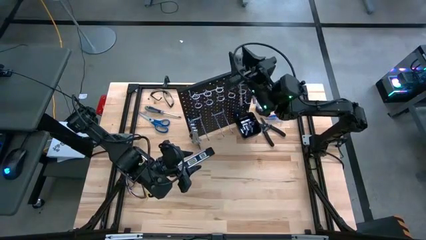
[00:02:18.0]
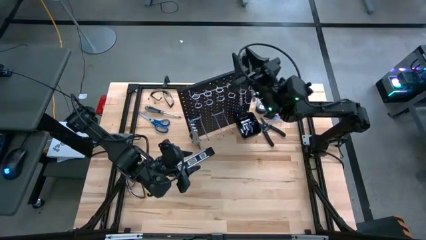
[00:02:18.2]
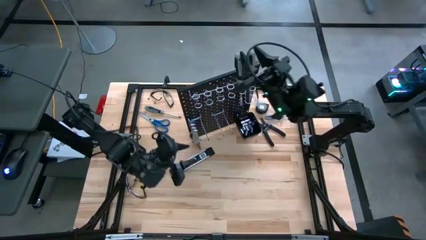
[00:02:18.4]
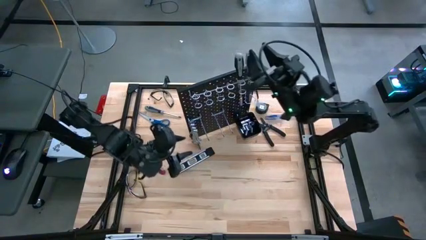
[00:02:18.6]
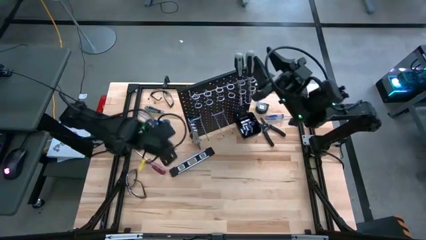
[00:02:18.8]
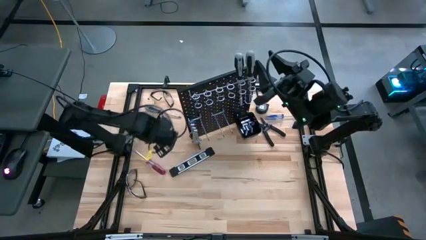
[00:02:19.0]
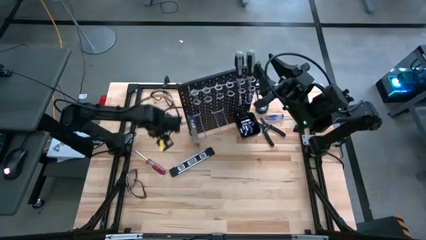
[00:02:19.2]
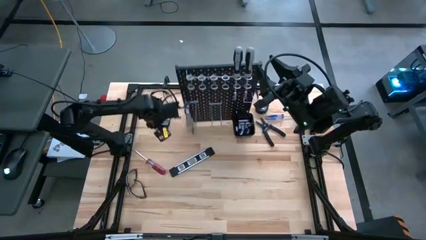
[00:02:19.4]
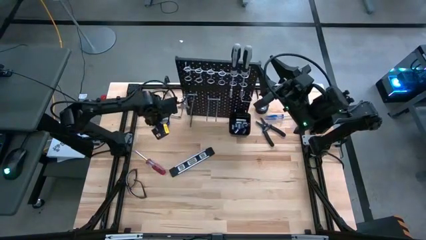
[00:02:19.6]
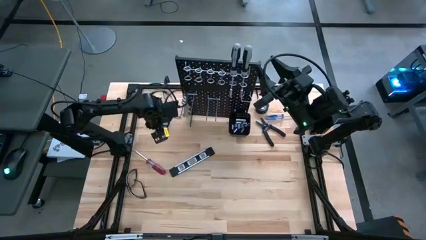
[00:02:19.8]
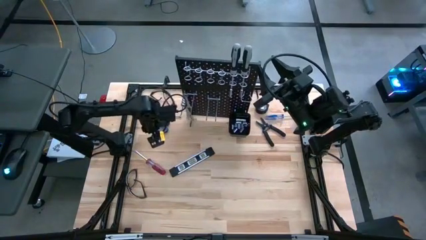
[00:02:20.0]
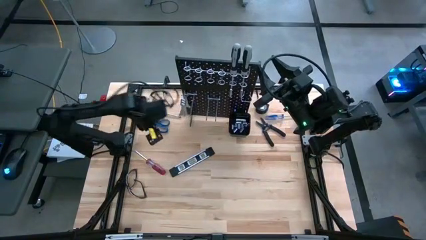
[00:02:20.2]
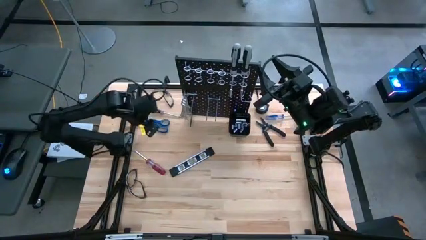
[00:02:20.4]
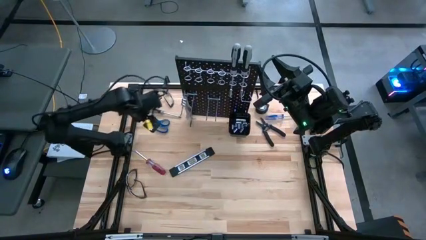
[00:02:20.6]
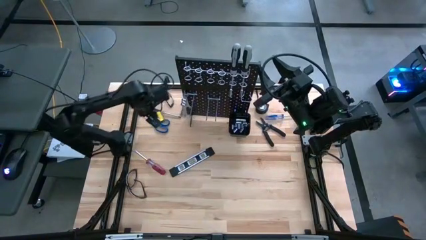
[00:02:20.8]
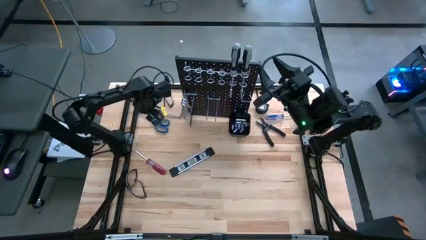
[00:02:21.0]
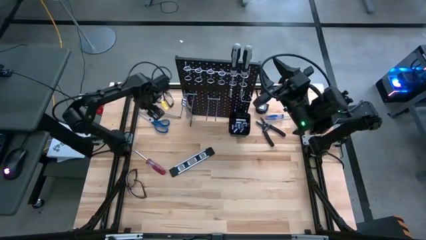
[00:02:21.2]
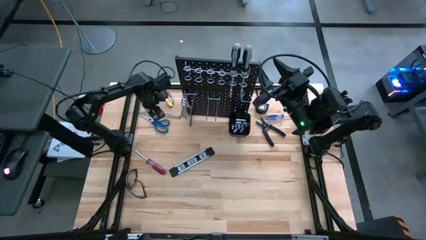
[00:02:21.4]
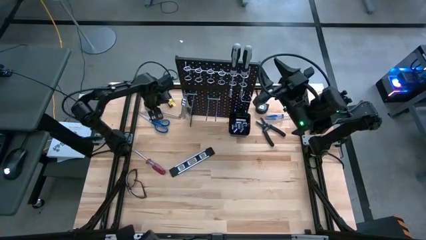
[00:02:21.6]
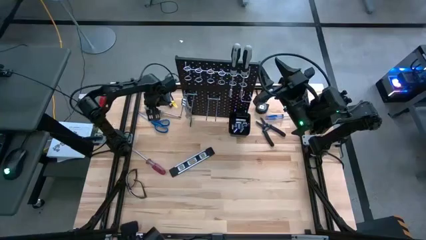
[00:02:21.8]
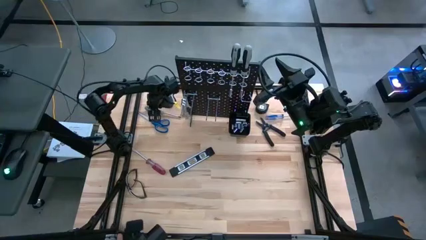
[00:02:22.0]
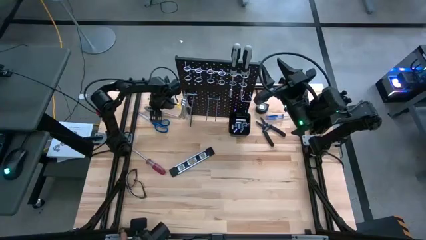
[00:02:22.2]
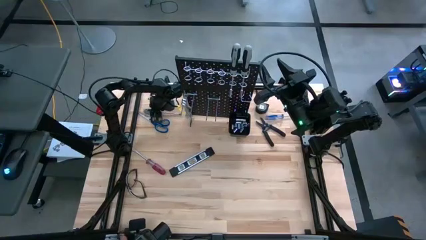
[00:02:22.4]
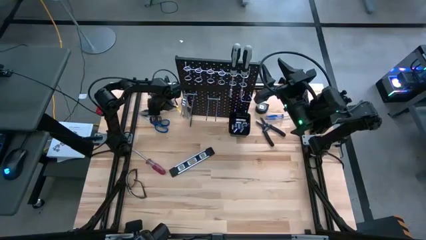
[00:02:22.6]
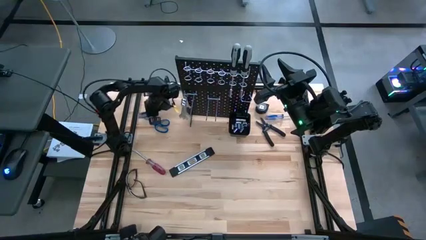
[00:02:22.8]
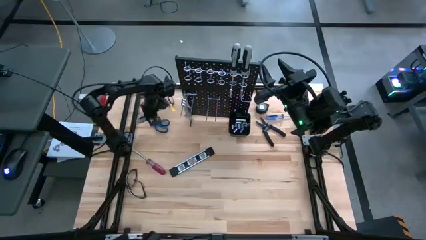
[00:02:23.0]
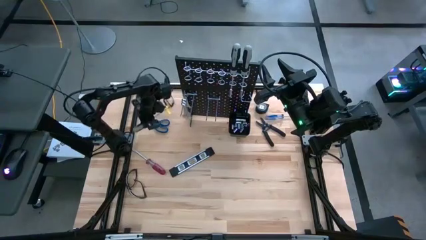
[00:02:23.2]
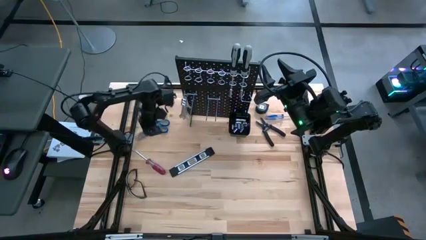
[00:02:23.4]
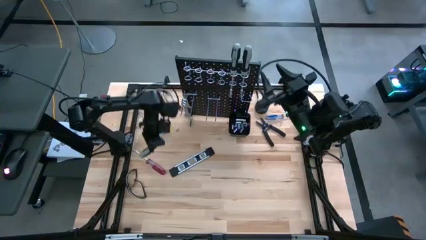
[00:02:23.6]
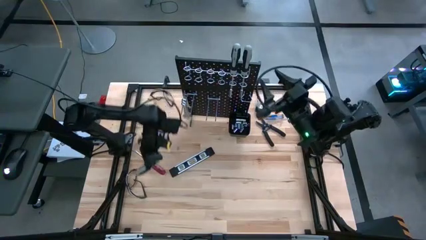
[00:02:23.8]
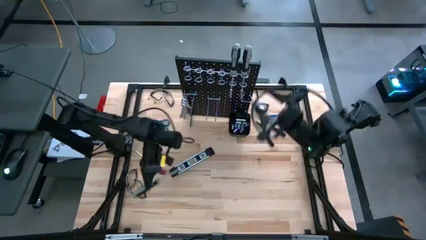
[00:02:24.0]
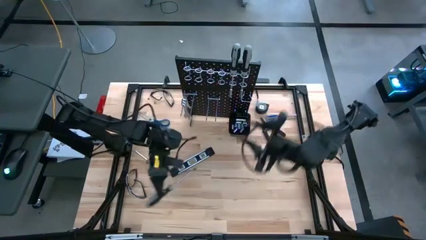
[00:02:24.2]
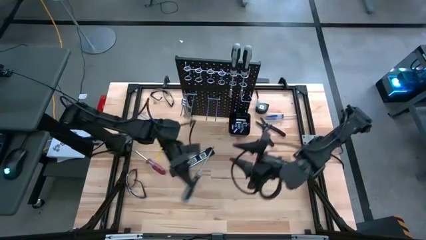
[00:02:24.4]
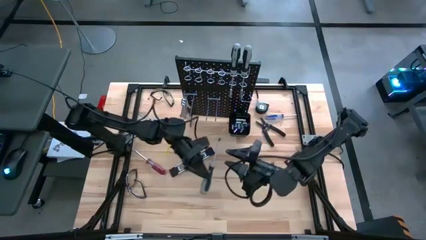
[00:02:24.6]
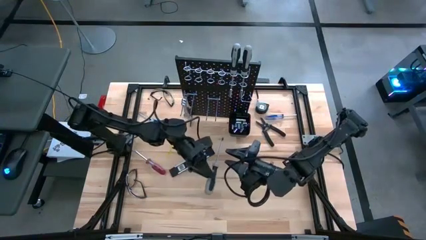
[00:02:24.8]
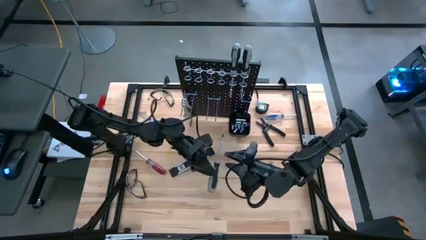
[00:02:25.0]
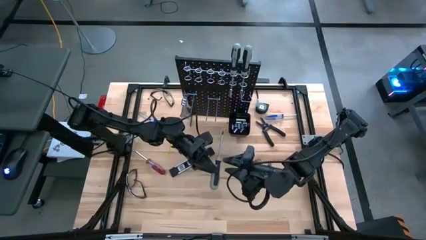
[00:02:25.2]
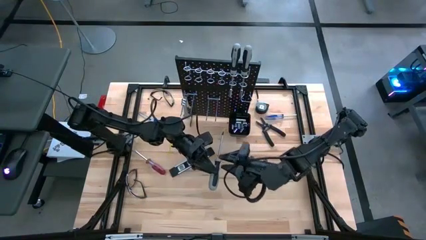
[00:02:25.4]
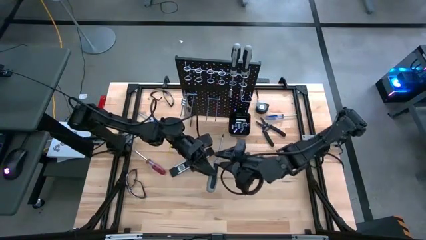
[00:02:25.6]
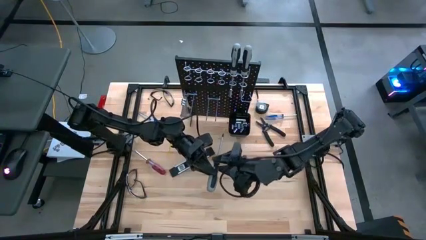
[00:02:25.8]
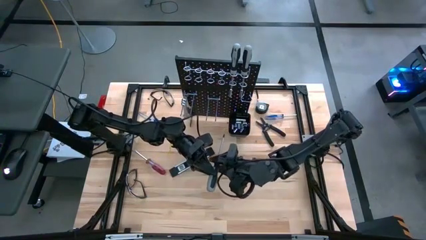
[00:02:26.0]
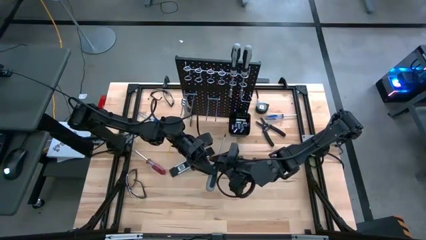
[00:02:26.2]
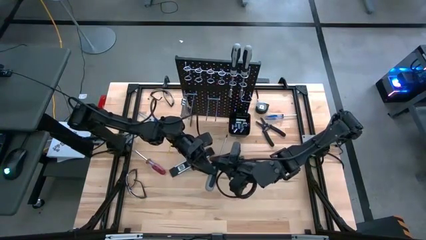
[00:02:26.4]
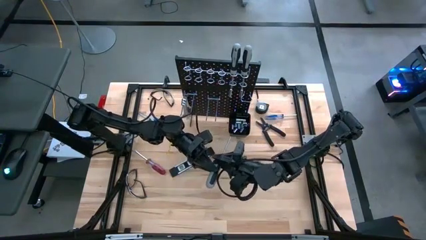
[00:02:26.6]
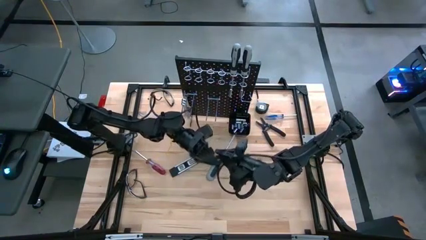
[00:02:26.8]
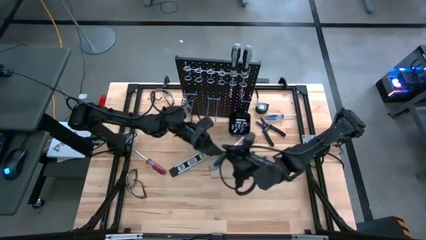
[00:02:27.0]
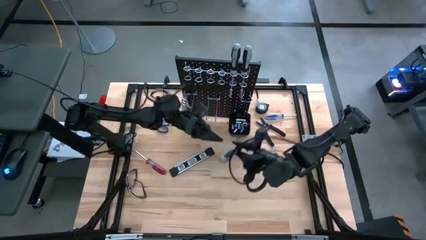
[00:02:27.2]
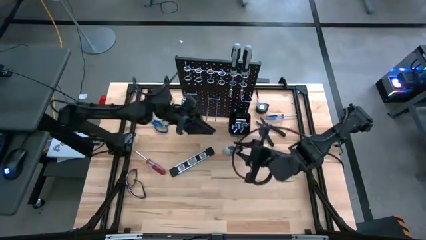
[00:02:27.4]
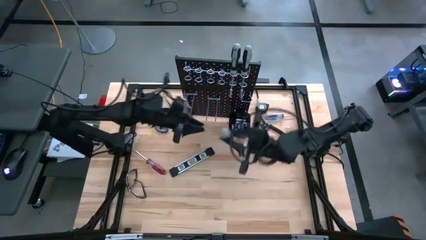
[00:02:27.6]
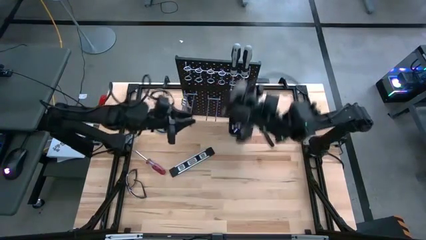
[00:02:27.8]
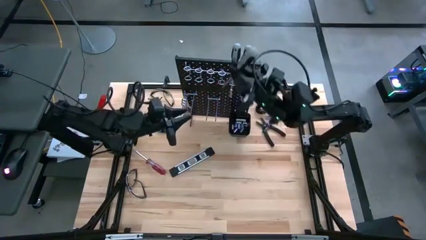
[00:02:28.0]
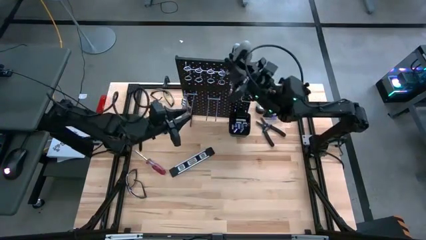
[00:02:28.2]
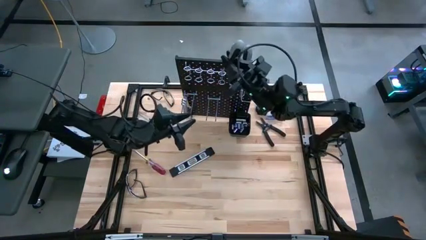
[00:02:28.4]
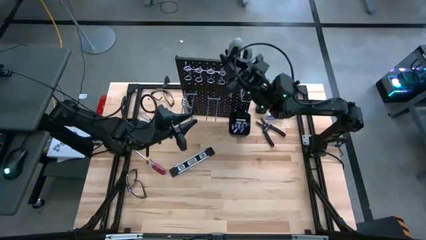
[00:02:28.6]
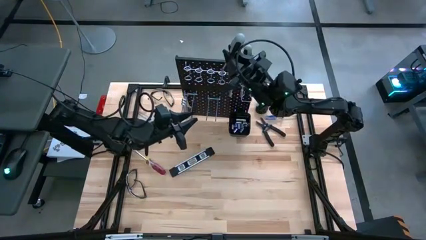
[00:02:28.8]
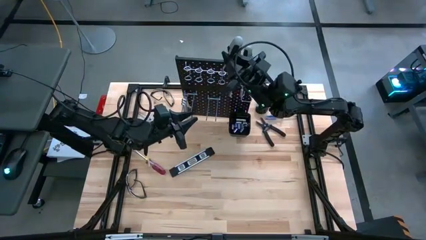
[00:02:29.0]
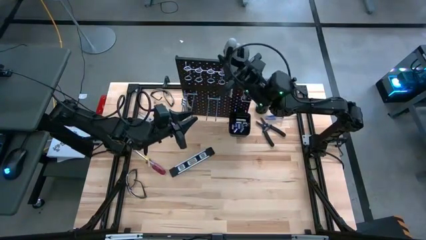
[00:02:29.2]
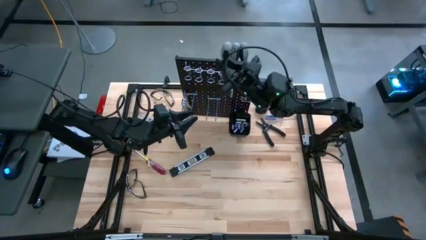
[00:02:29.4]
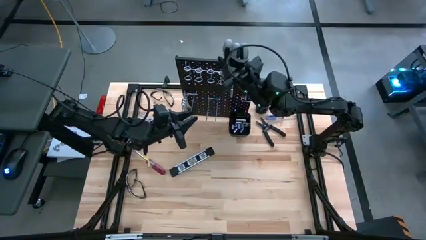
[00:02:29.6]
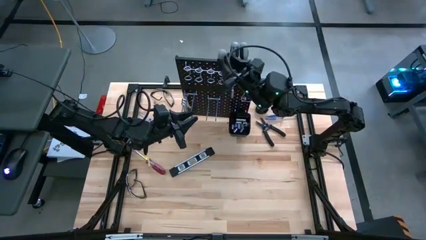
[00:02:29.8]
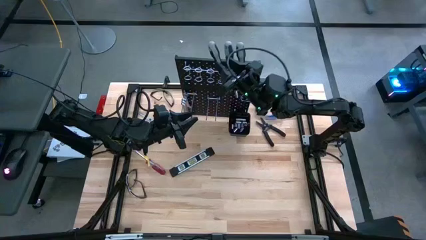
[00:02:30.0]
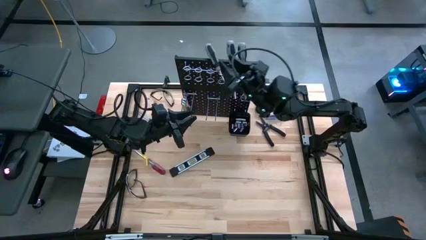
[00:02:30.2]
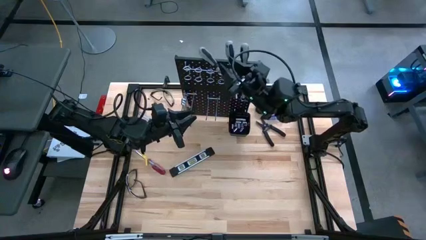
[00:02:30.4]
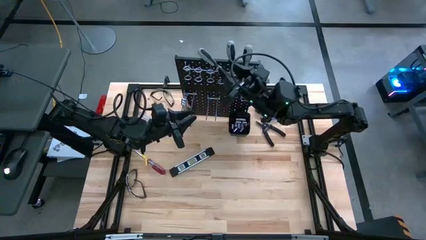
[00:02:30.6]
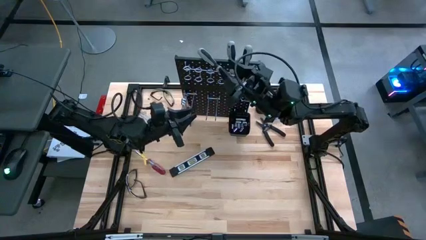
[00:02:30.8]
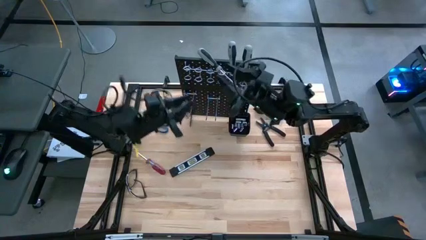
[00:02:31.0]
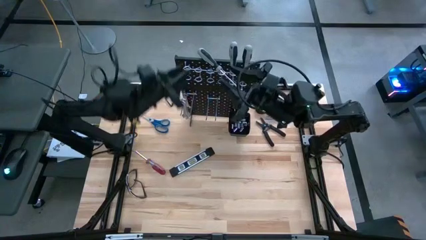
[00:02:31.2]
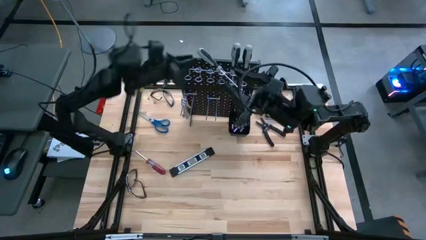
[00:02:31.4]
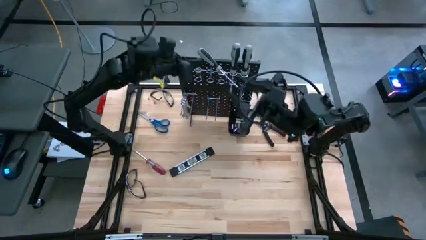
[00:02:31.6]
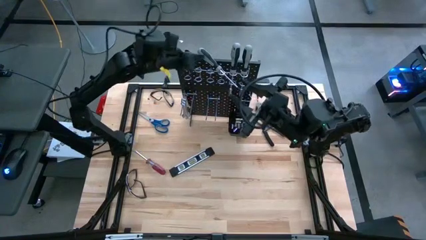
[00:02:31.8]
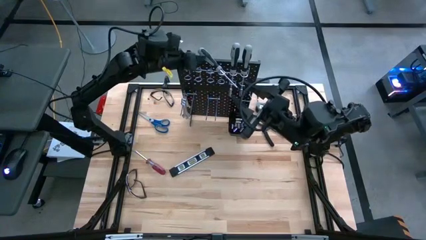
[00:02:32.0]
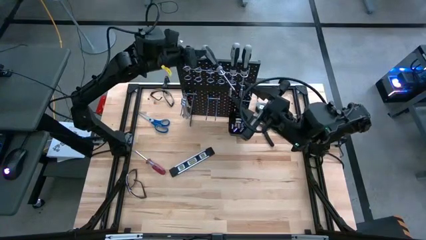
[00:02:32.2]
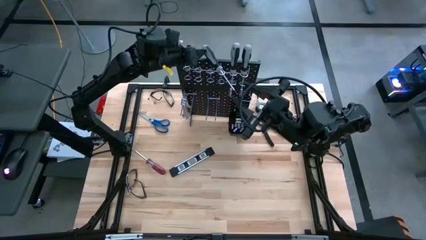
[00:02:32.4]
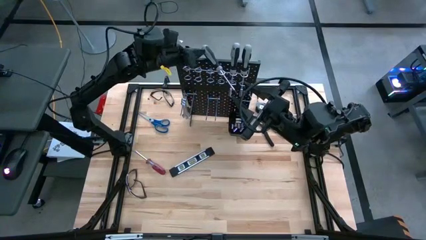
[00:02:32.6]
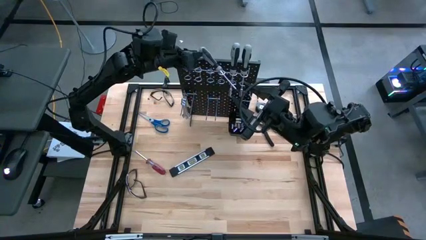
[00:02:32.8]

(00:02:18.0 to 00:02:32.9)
Task: Hang tools onto peg board
Hang the gray screwdriver on the pegboard

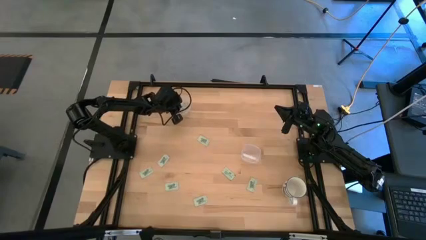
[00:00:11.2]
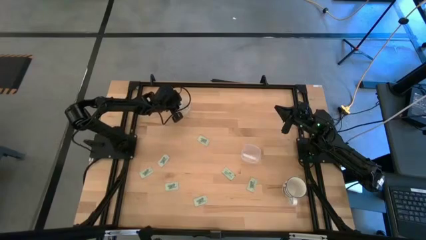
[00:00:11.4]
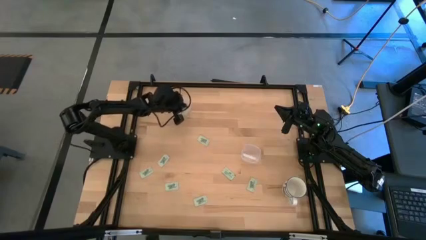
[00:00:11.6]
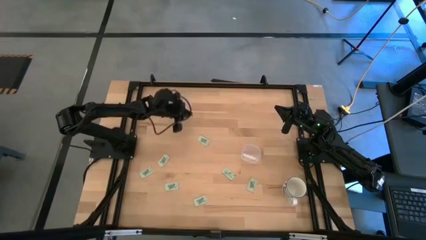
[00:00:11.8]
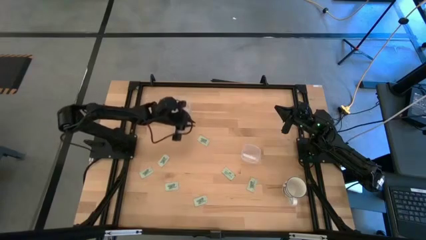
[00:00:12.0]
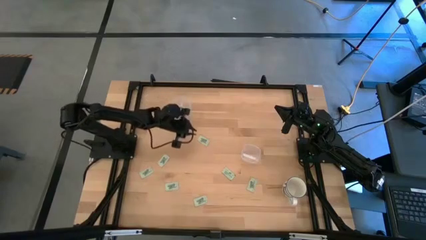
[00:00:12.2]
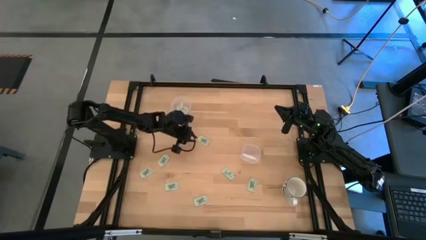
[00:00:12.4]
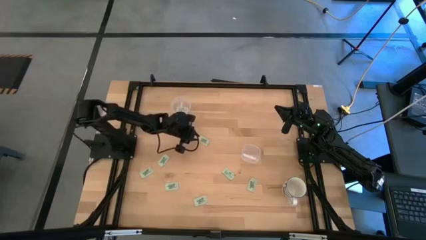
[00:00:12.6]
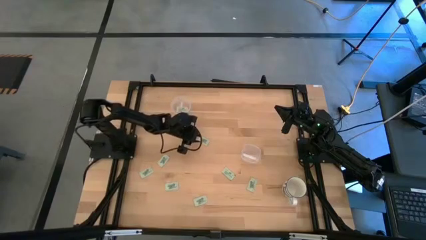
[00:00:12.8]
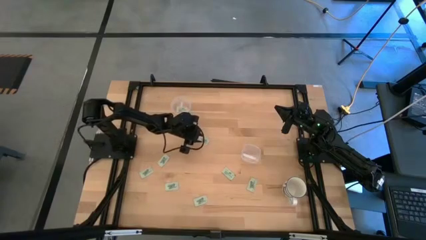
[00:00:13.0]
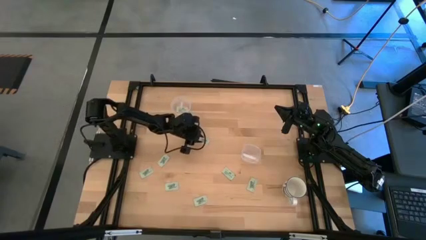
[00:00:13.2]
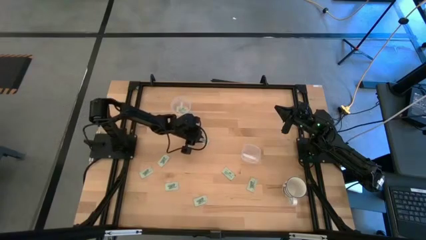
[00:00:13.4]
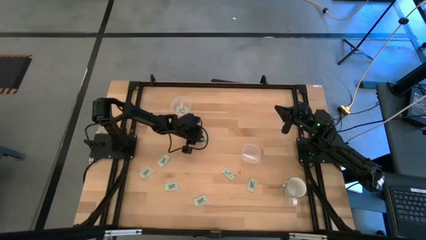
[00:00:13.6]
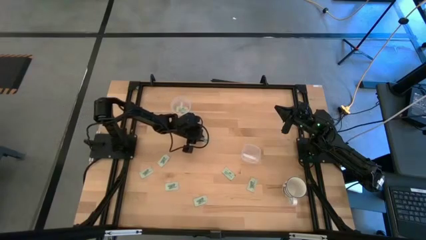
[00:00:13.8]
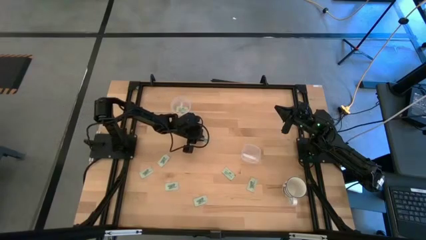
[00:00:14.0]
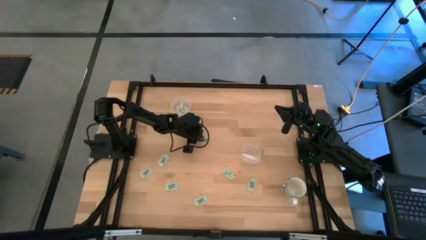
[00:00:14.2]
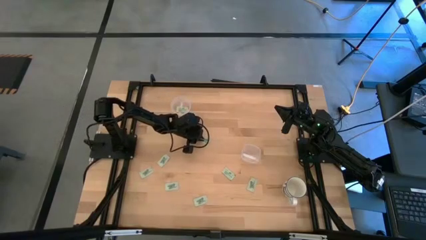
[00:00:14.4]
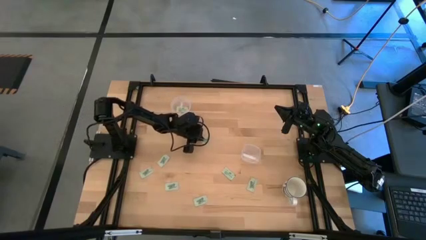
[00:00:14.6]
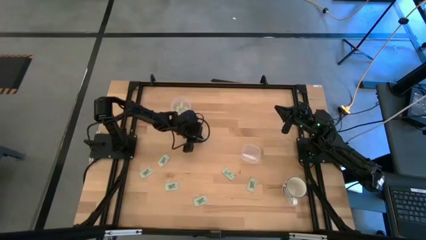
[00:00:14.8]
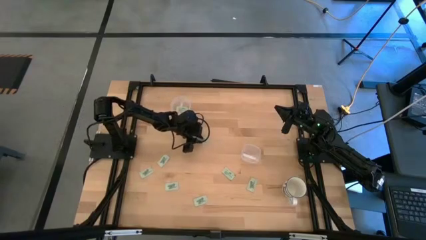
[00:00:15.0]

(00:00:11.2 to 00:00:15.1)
Task: Pick and place Stevia / Truvia into bins
Put the stevia packet into the top transparent container
